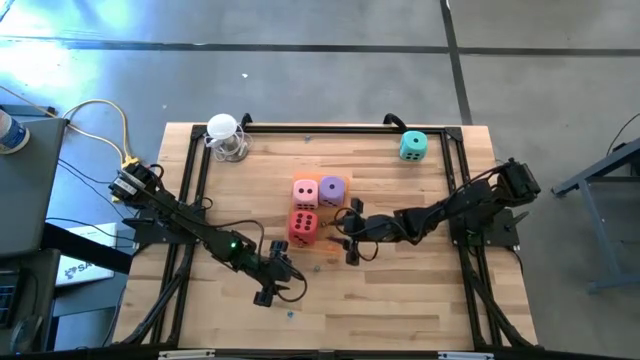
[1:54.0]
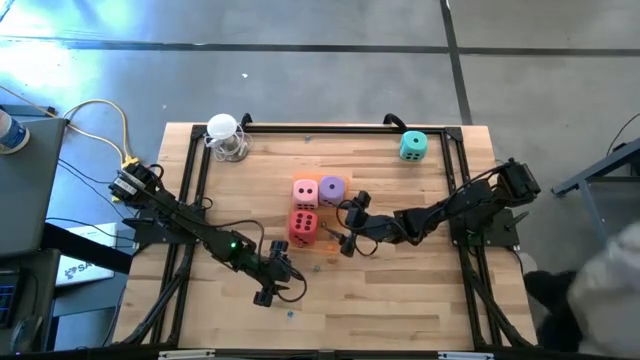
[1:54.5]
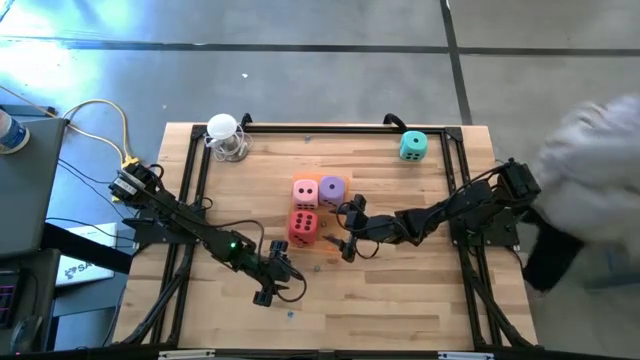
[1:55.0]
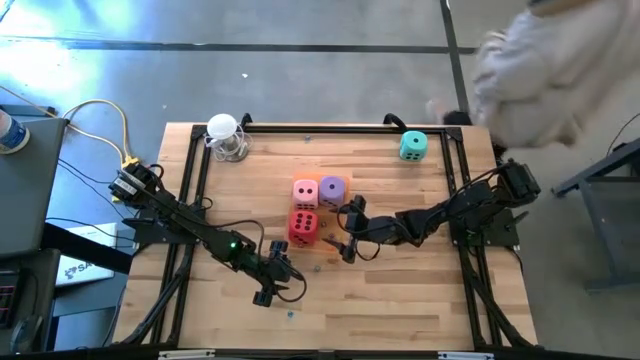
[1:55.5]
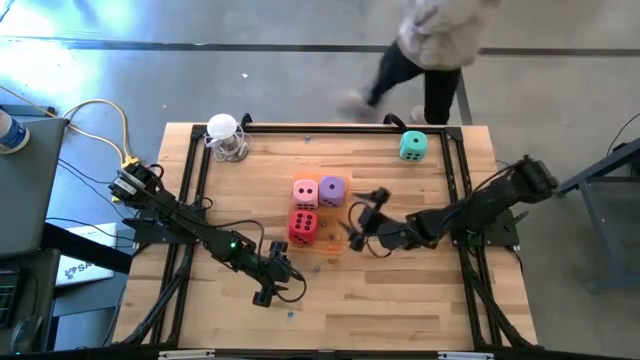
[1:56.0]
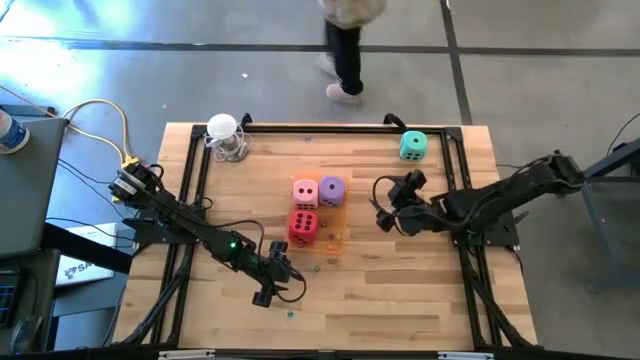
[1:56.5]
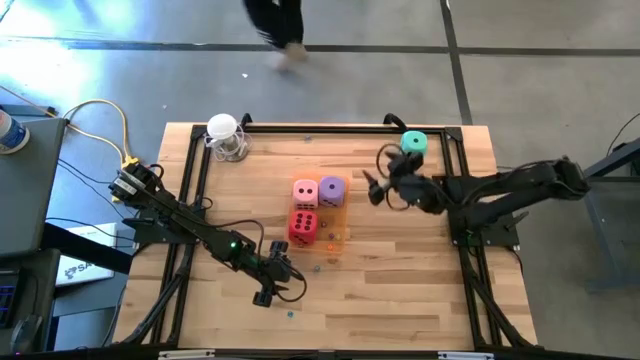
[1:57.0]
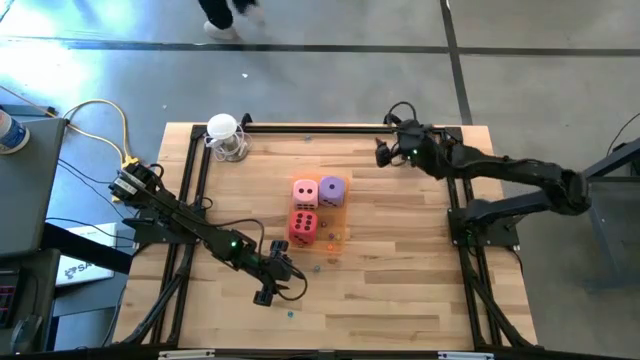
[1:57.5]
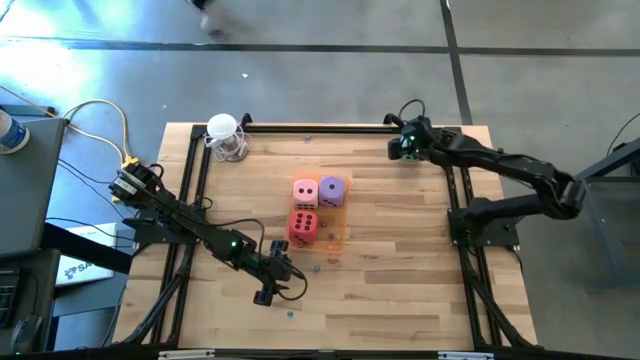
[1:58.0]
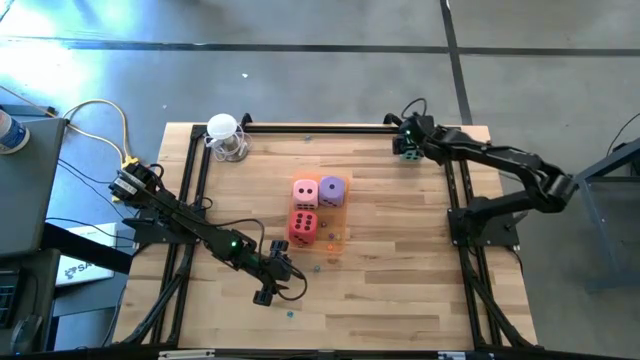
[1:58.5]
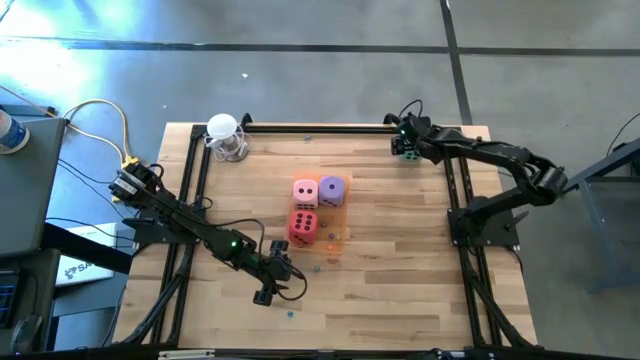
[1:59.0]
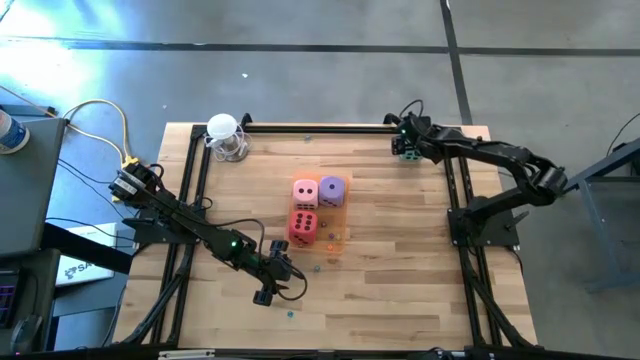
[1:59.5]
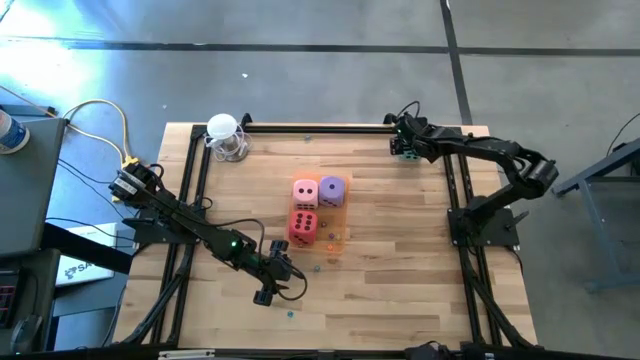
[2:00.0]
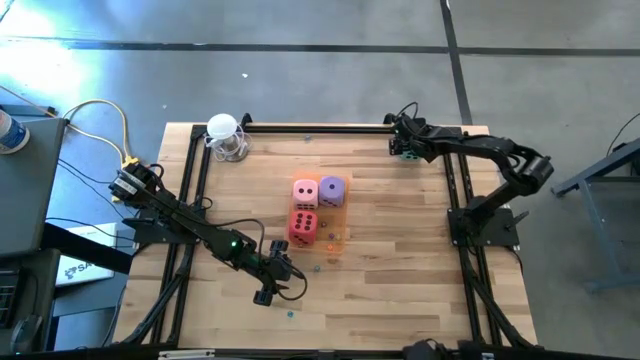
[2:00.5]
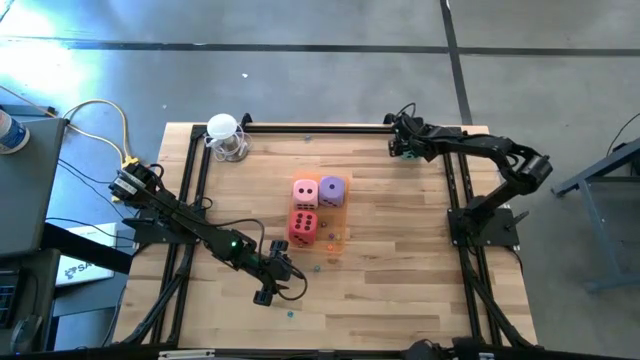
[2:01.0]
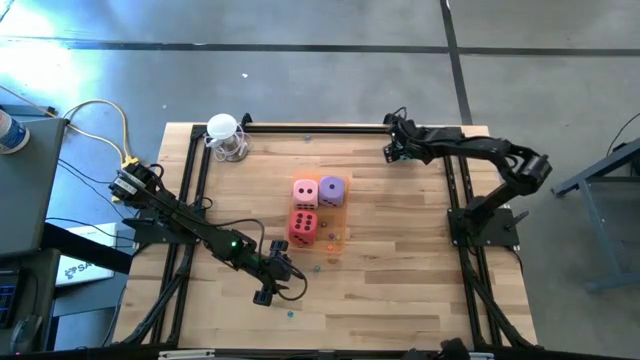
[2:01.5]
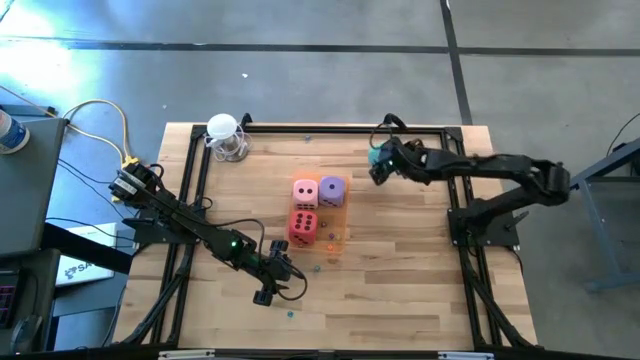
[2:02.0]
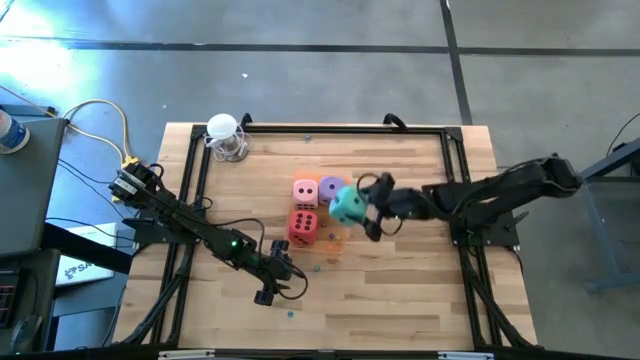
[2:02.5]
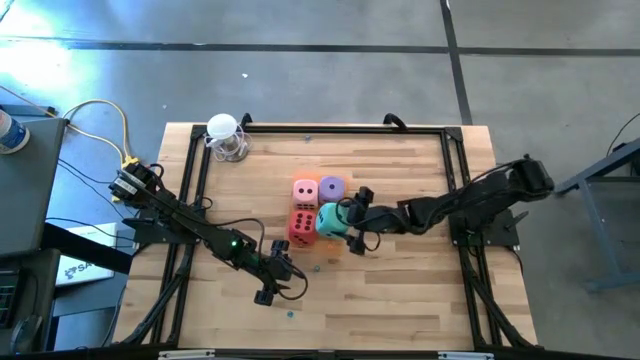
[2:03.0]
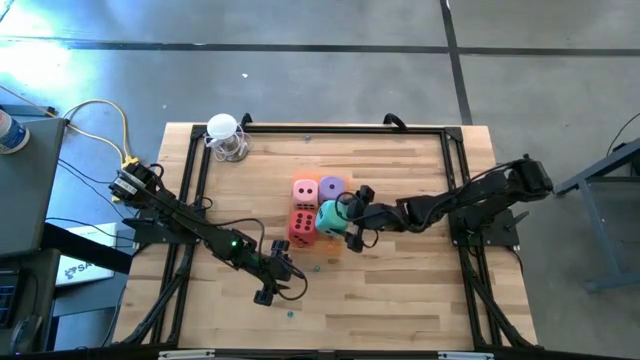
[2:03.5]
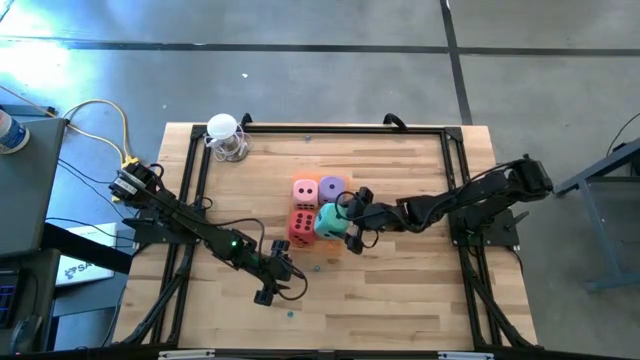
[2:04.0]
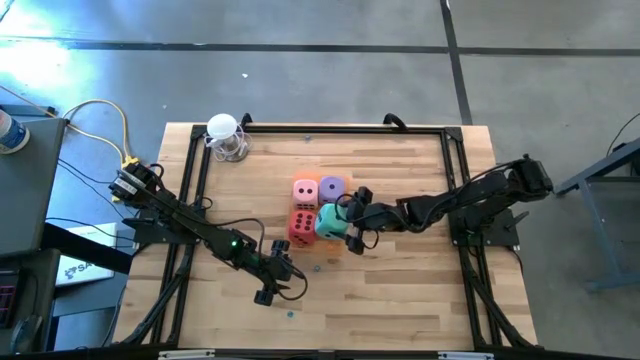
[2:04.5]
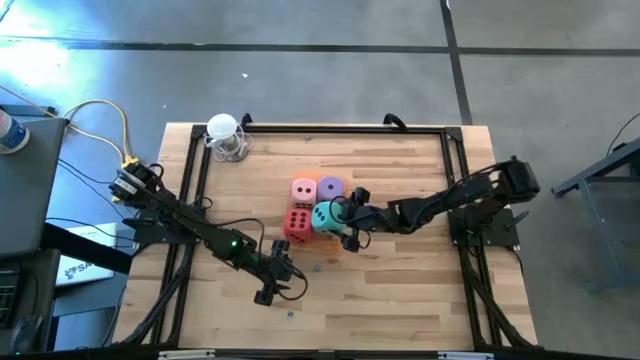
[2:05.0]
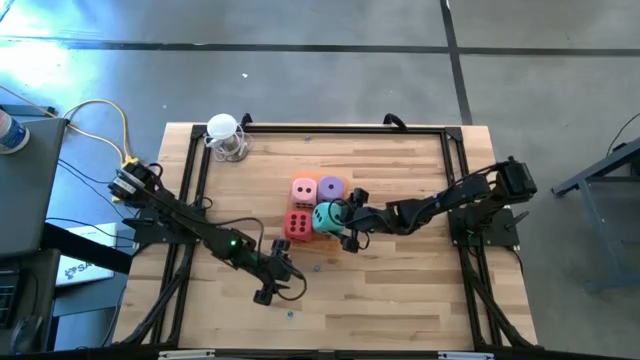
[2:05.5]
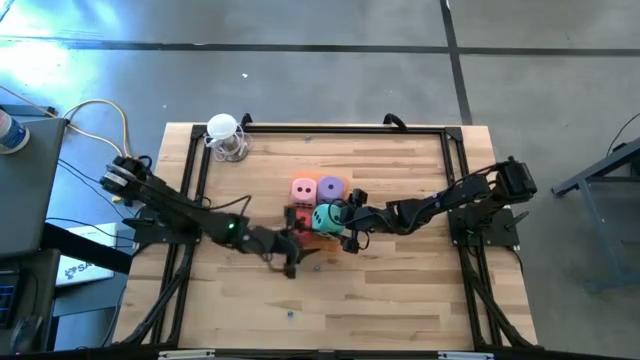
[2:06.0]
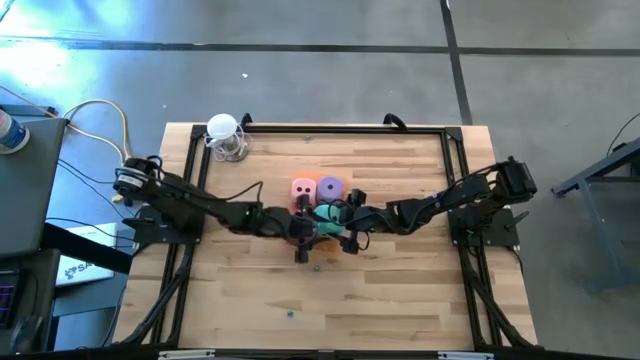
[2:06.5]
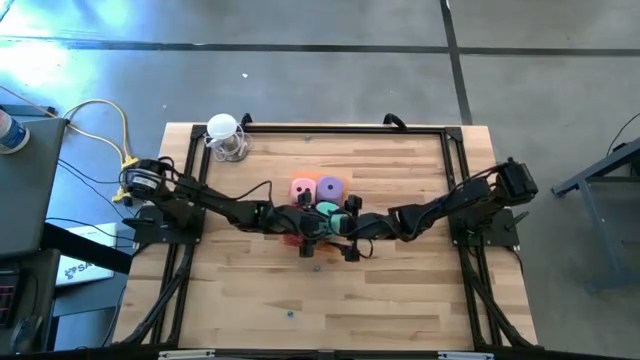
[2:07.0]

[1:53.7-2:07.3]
Task: Pick & Place Dice
Put the large light blue die into the orange bin

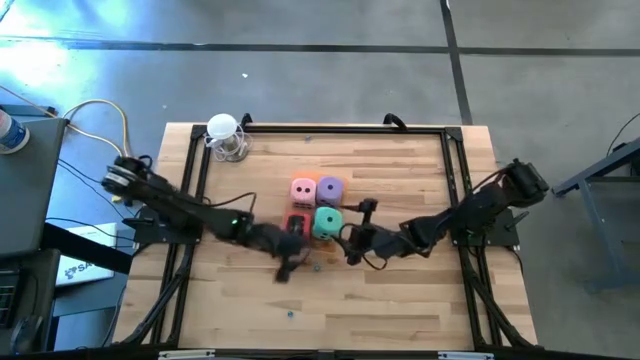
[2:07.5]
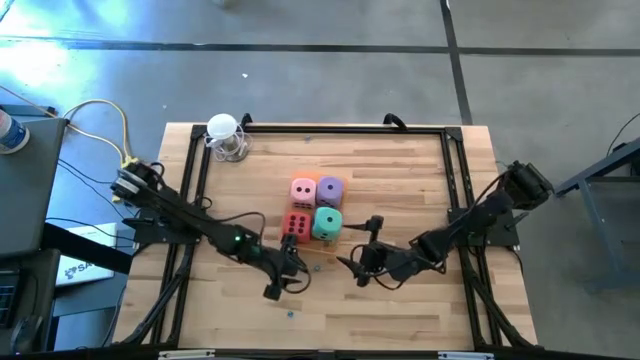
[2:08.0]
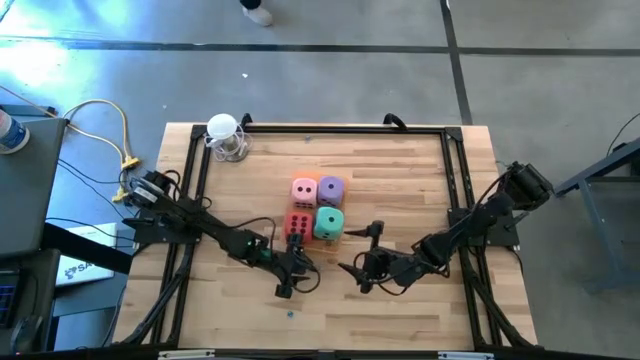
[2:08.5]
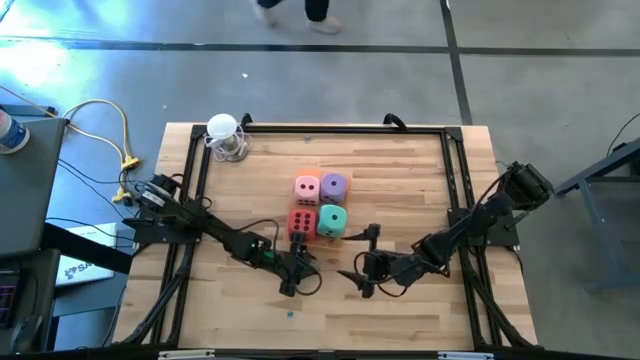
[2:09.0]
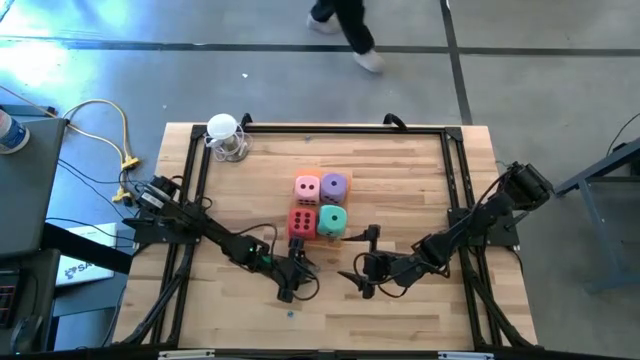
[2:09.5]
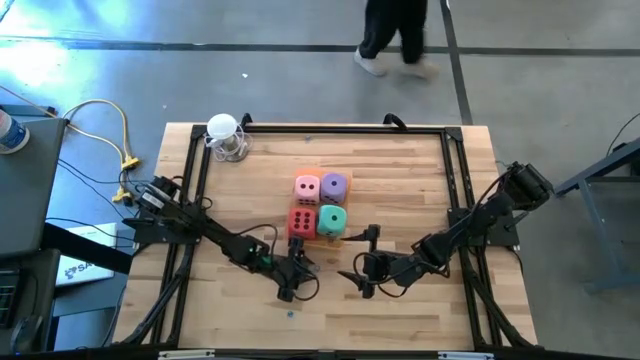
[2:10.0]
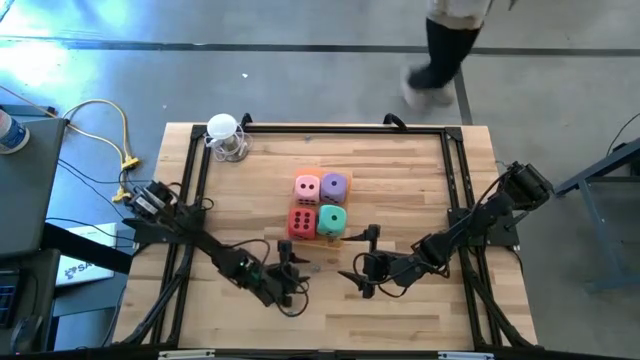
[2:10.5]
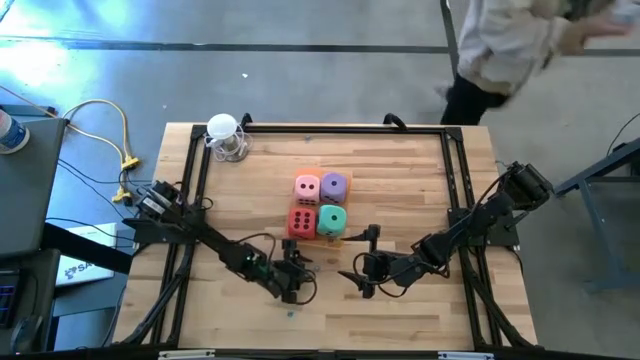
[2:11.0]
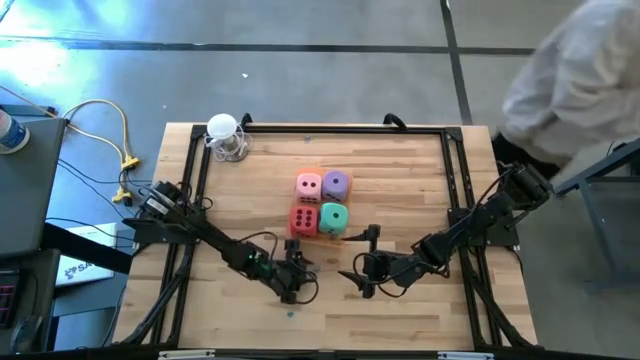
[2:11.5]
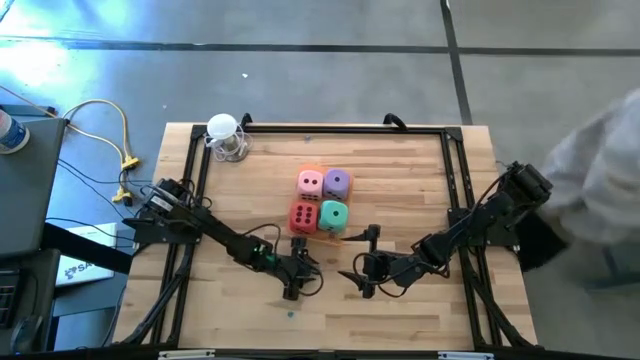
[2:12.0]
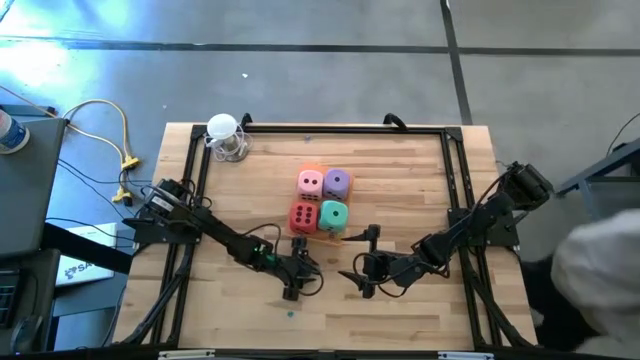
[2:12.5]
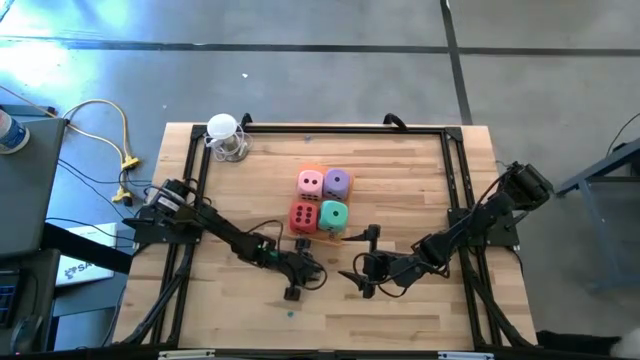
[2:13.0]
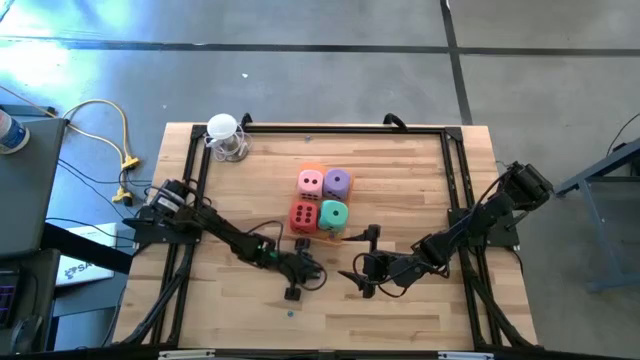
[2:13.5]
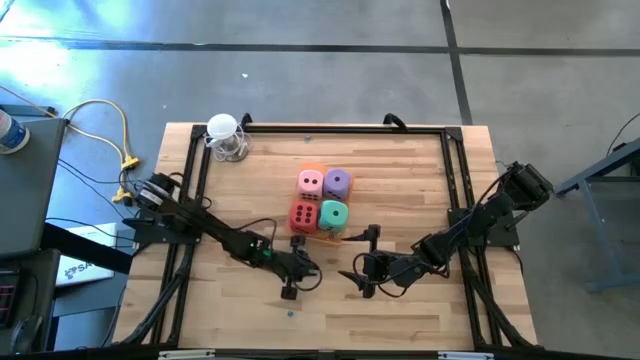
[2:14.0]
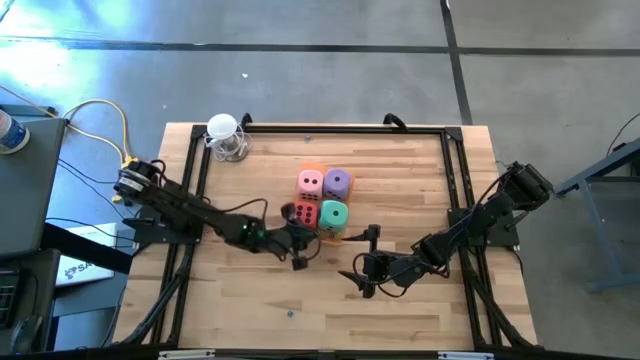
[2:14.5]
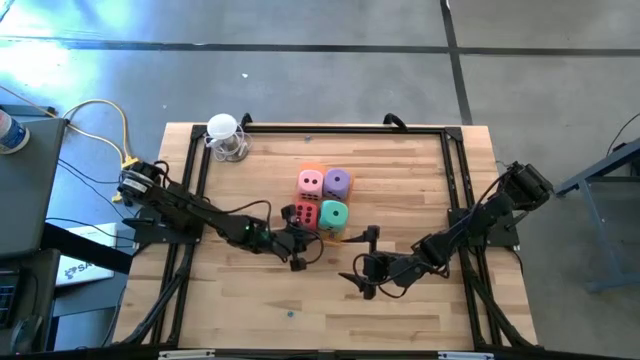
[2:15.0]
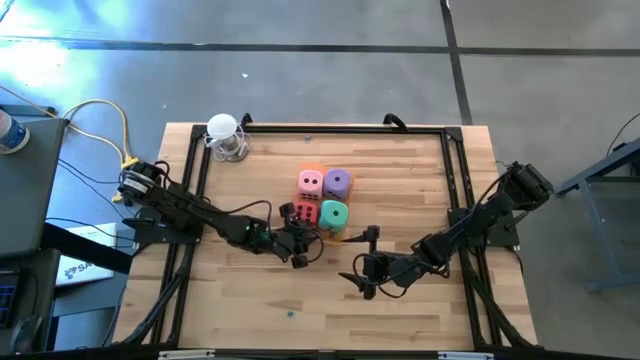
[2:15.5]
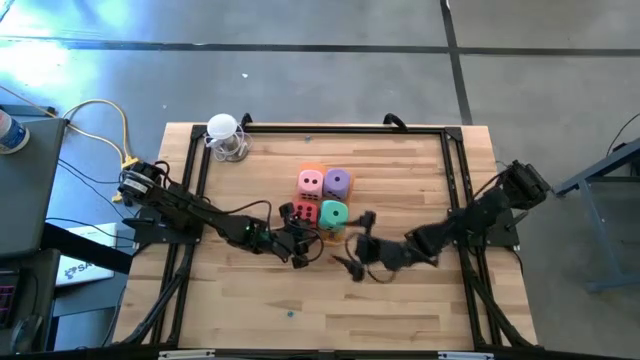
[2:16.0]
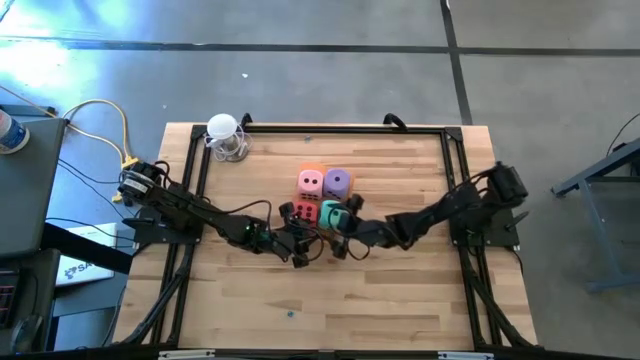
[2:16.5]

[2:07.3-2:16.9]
Put the middle small light blue die into the orange bin
